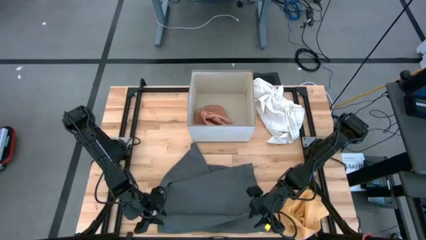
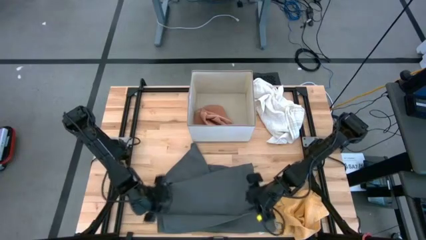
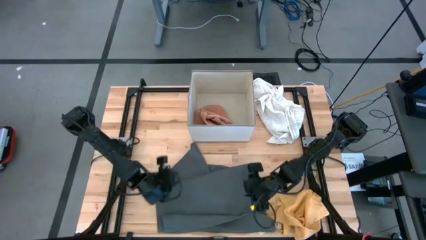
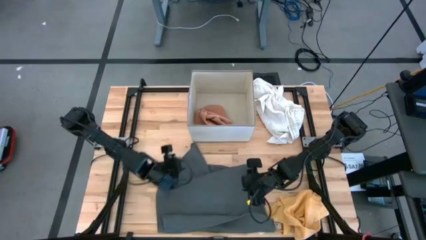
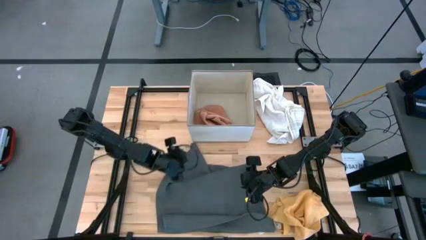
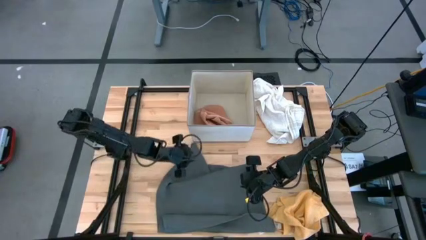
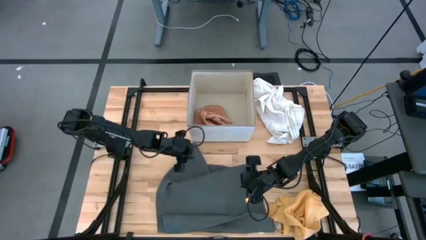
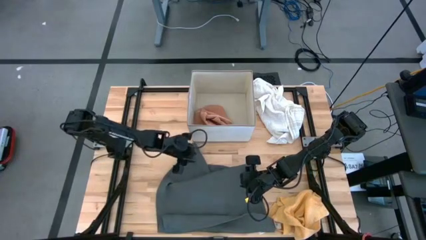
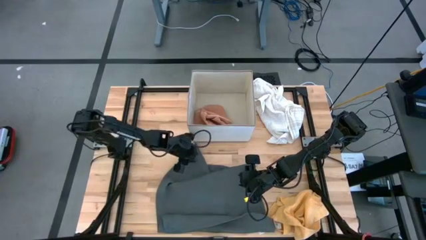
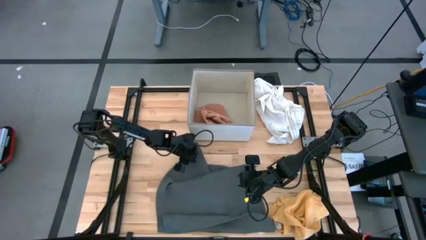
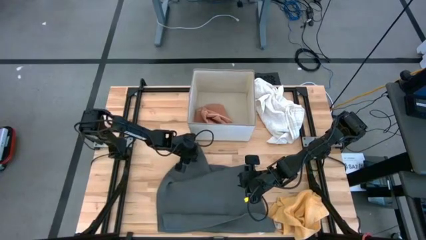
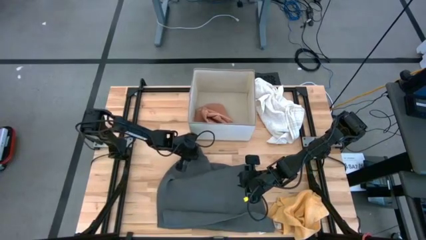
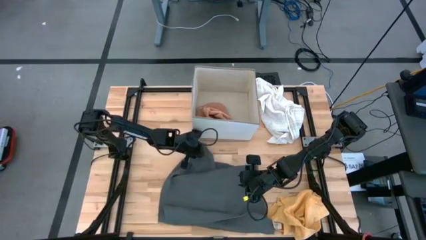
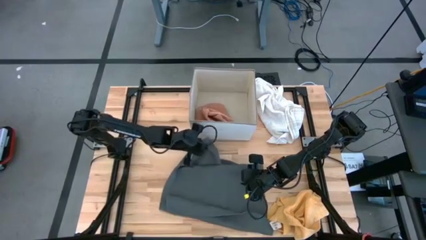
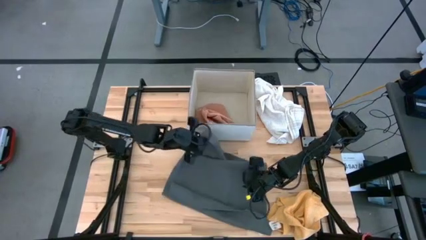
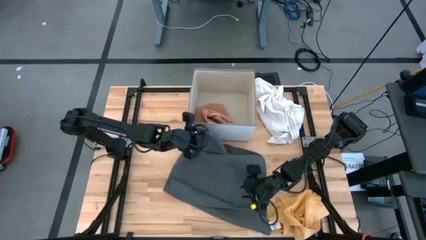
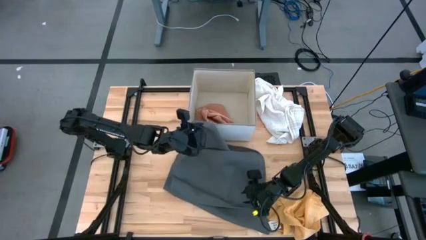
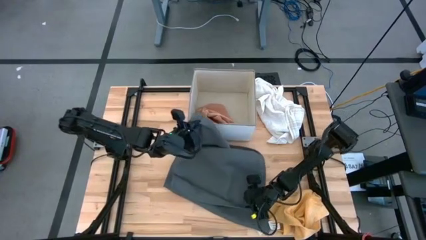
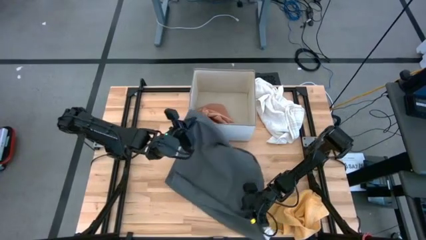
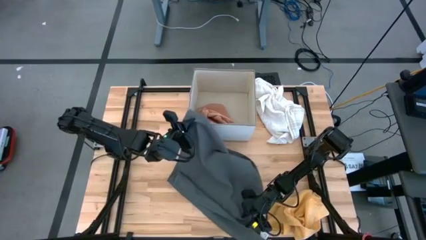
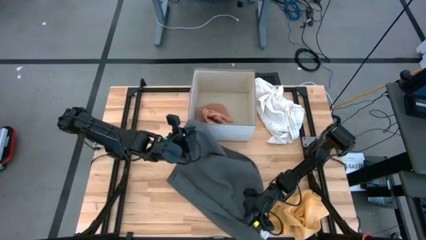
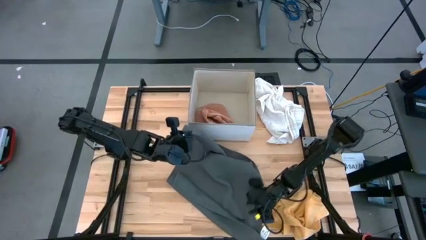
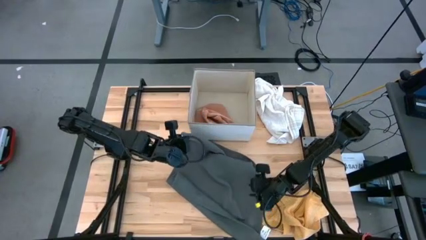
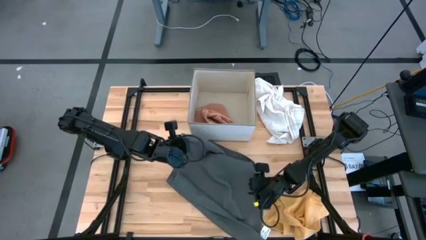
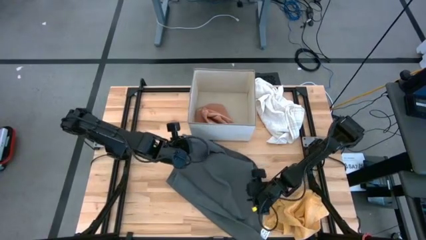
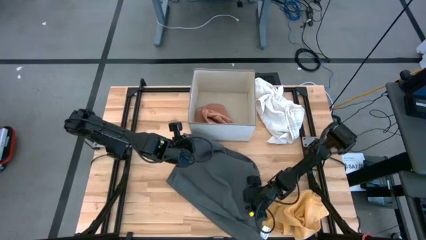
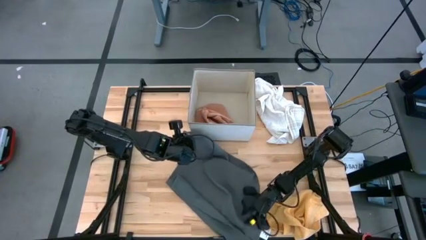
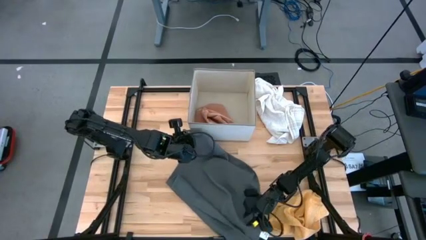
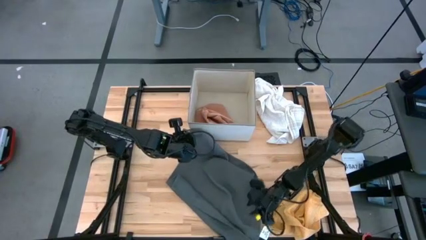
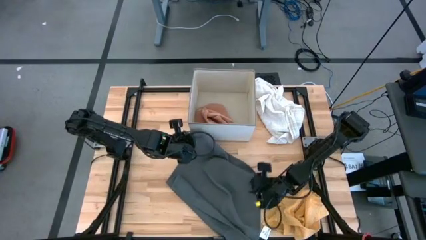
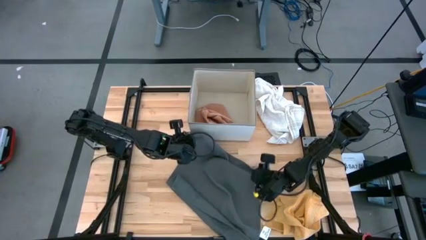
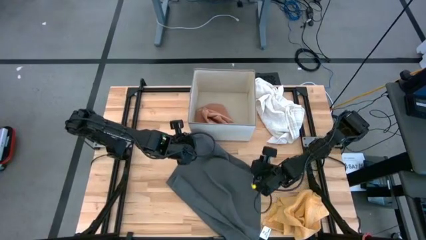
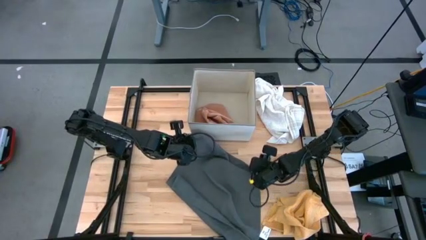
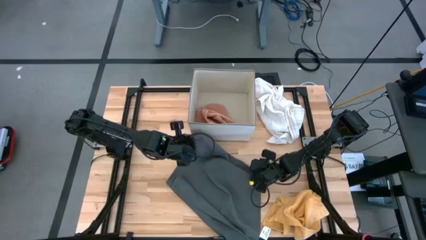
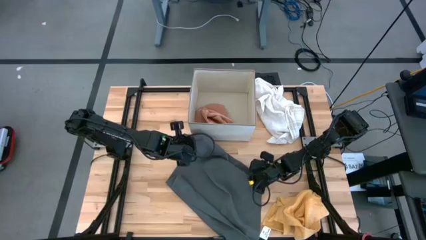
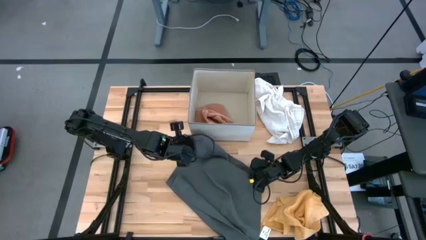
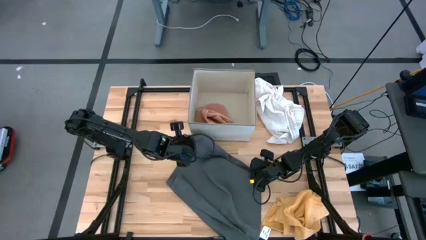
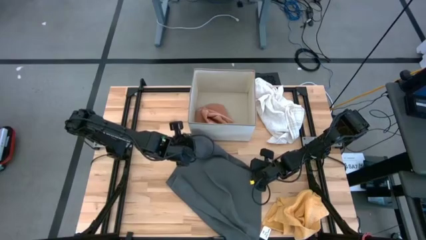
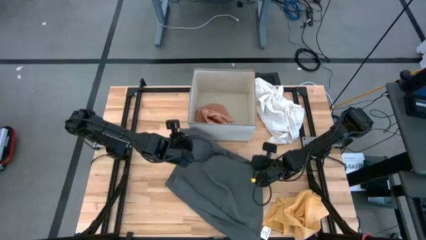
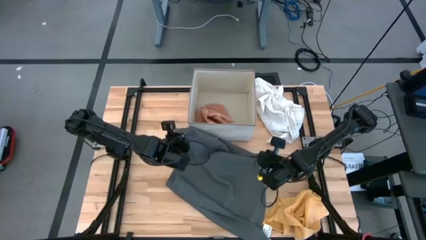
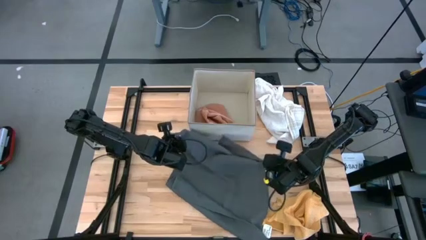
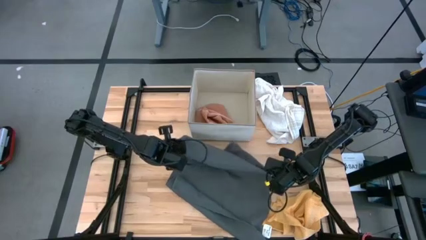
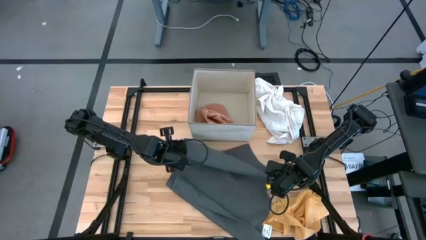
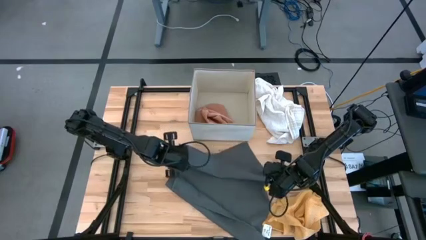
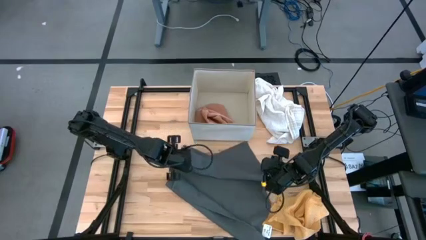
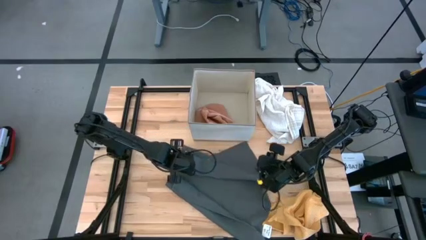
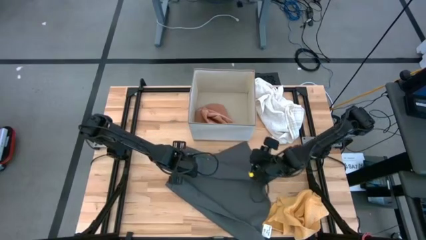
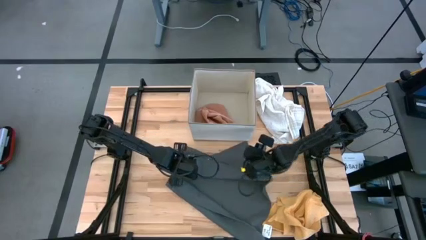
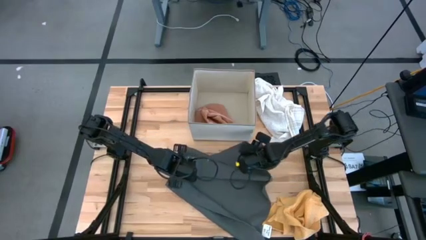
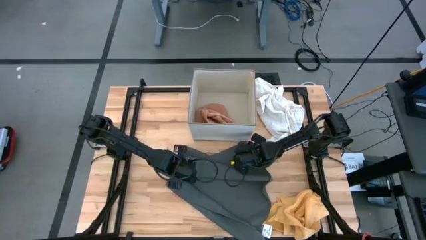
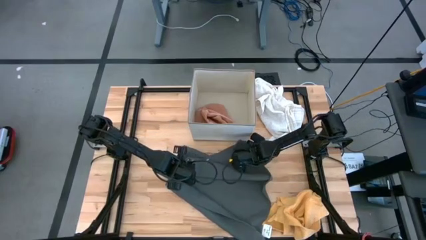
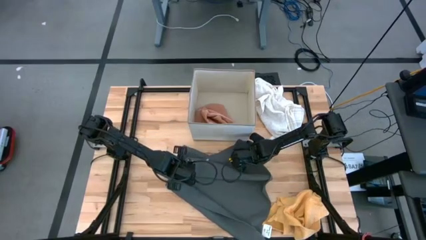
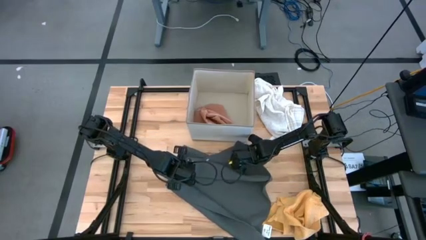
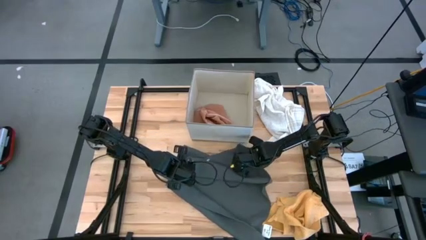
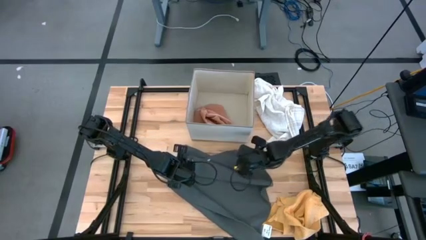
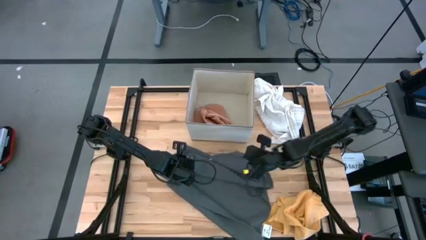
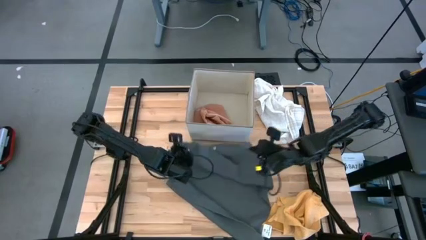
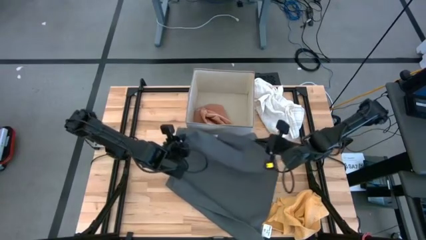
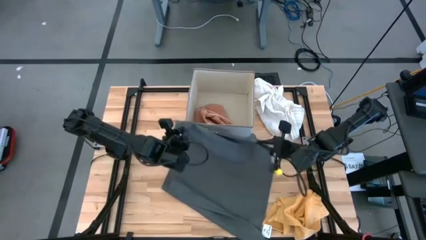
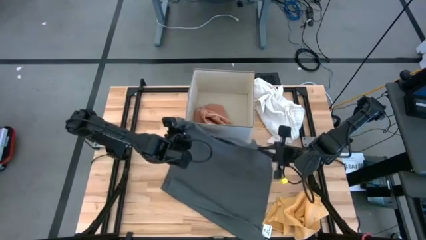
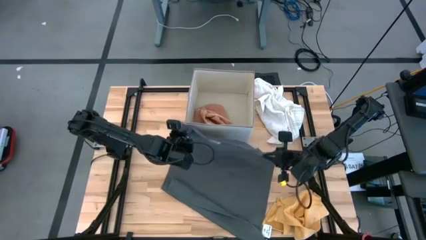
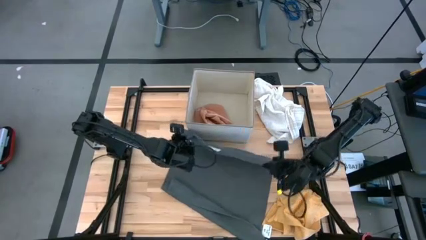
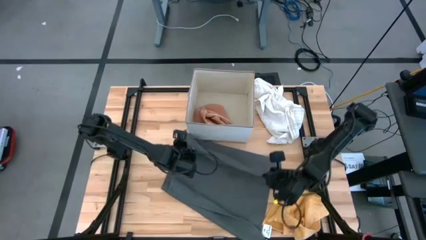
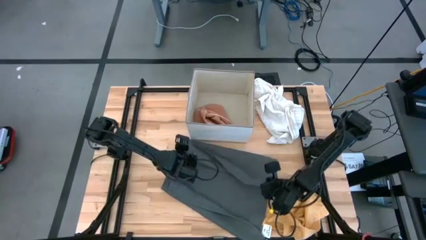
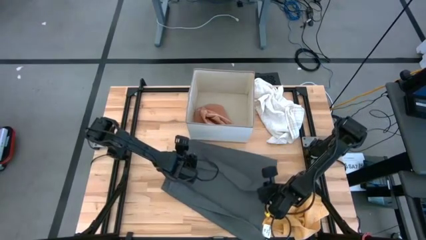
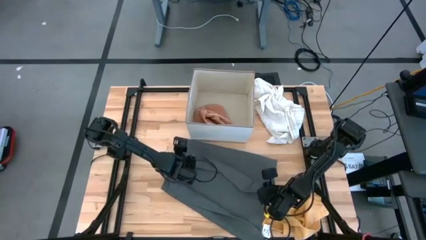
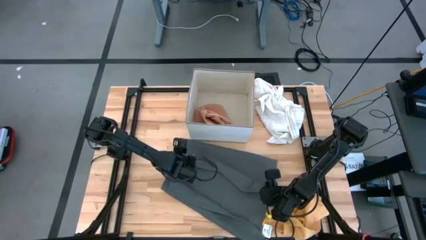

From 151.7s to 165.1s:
Task: Fold towel
Fold the gray towel

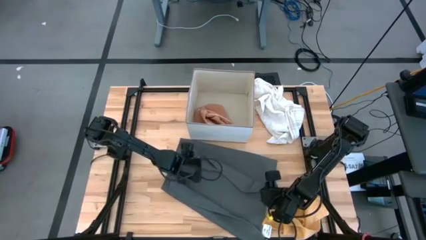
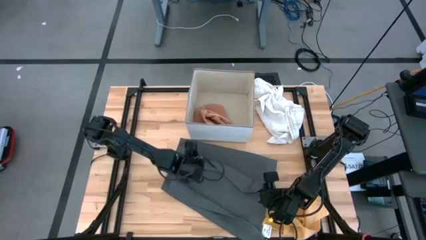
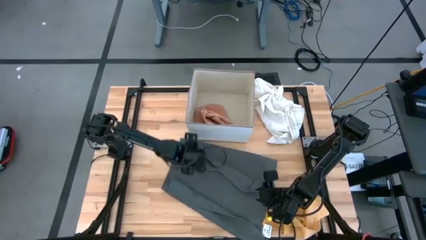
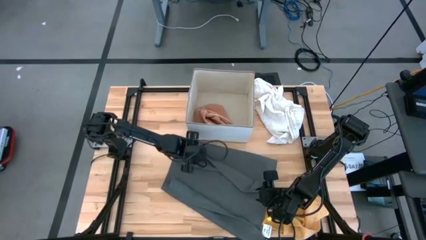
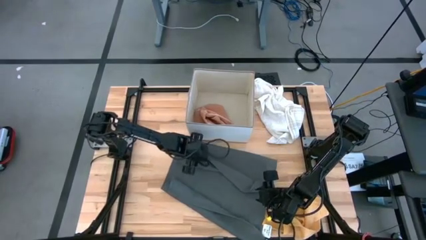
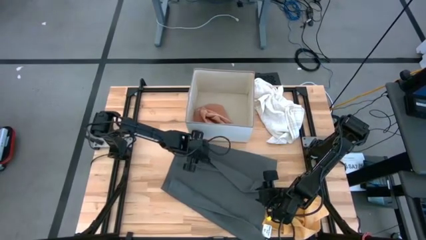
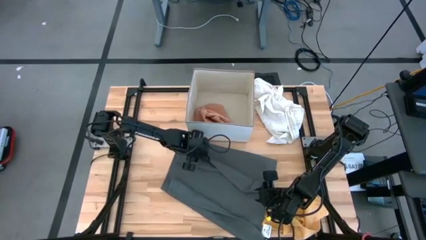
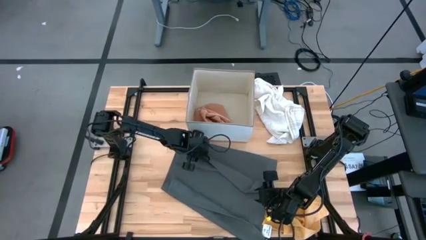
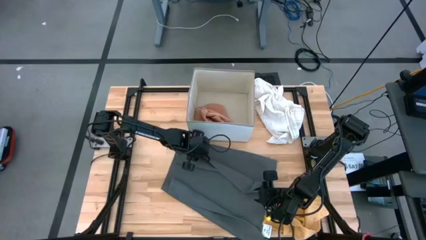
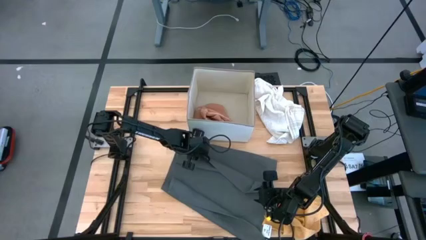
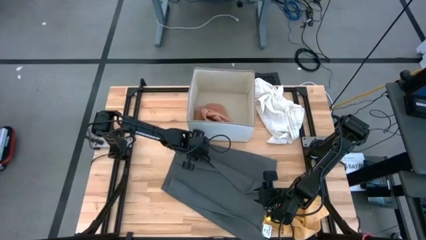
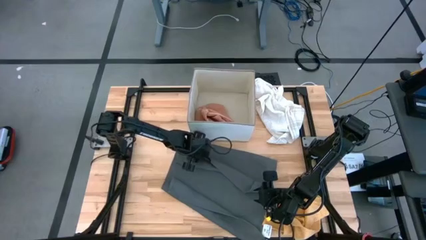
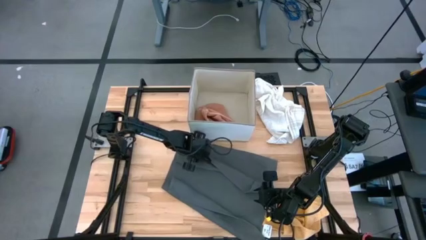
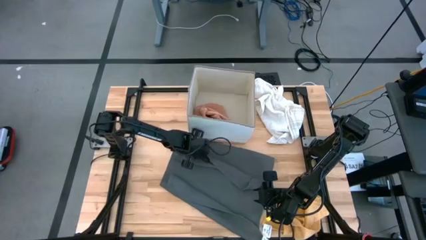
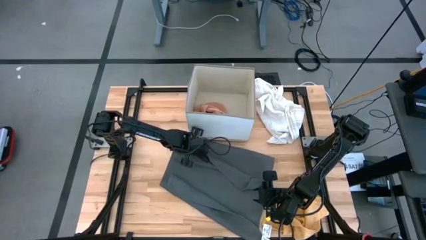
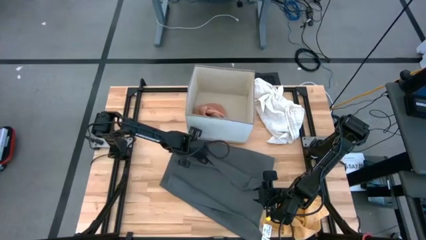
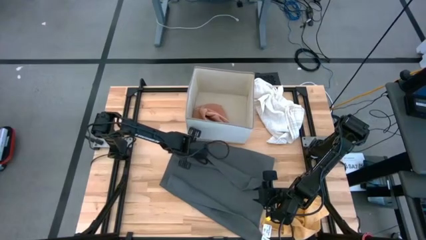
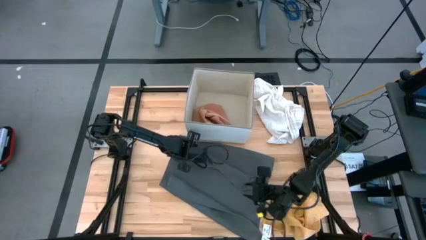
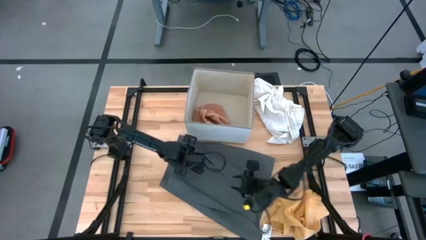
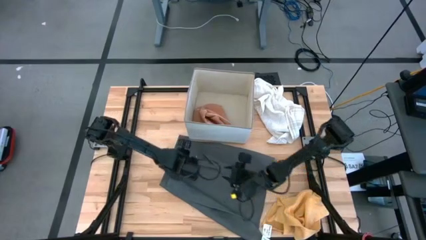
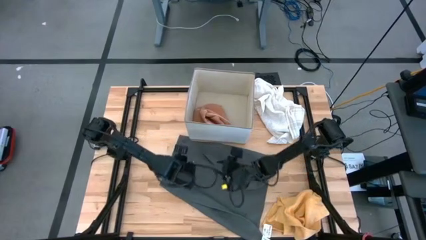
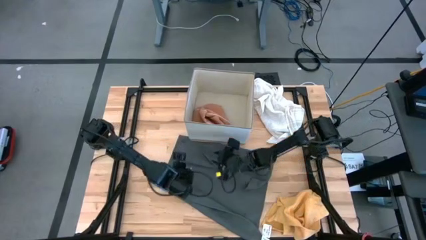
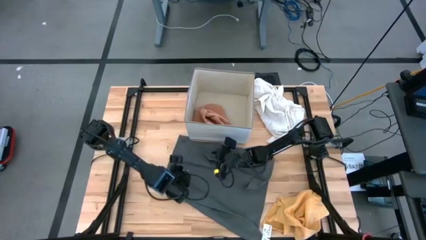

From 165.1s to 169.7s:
Fold the gray towel
